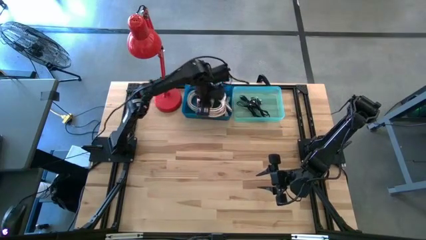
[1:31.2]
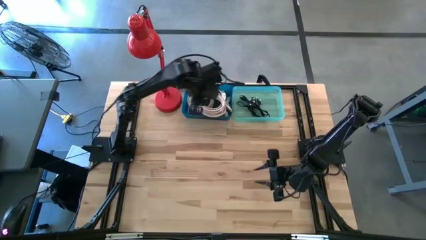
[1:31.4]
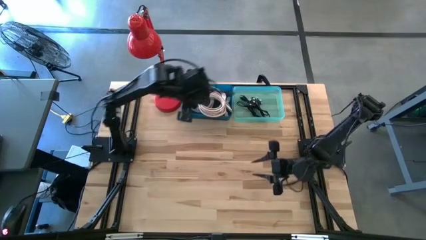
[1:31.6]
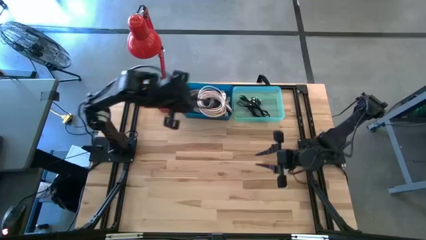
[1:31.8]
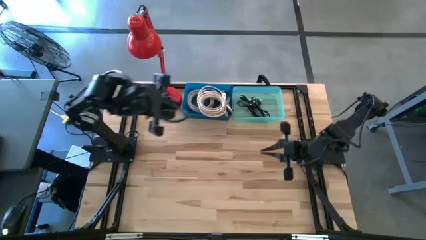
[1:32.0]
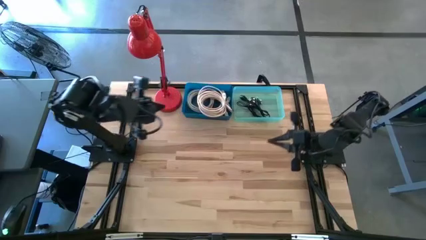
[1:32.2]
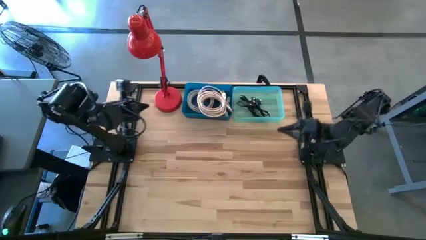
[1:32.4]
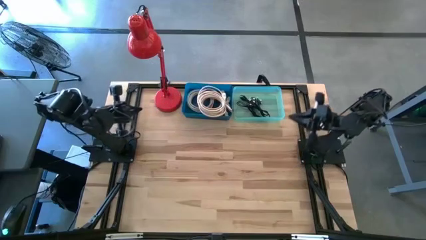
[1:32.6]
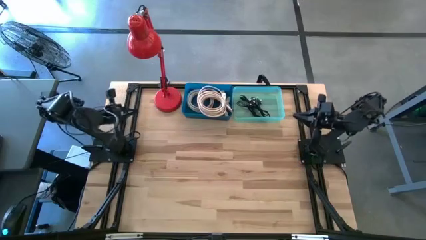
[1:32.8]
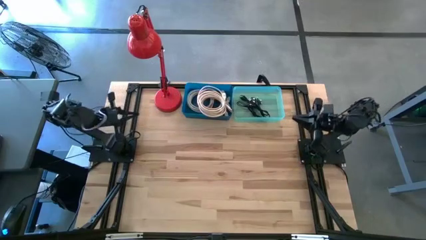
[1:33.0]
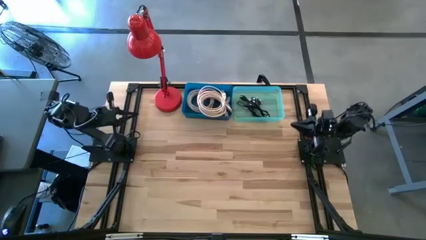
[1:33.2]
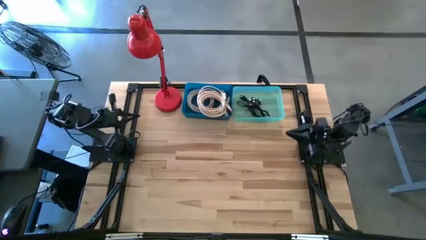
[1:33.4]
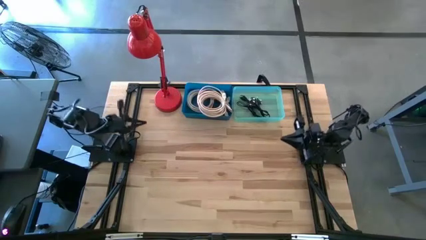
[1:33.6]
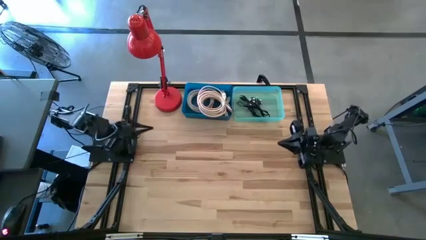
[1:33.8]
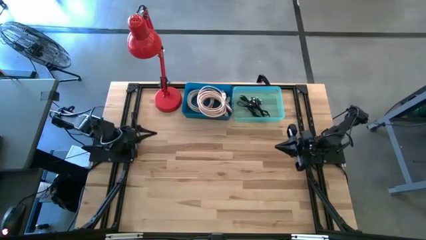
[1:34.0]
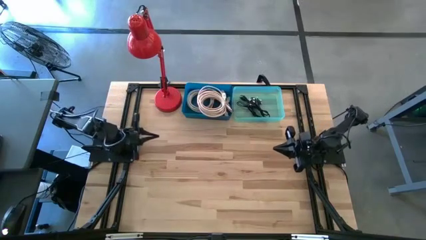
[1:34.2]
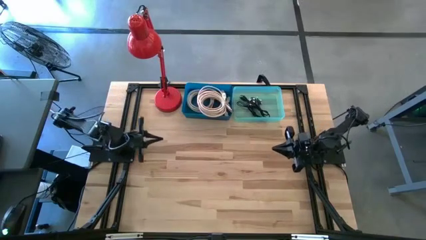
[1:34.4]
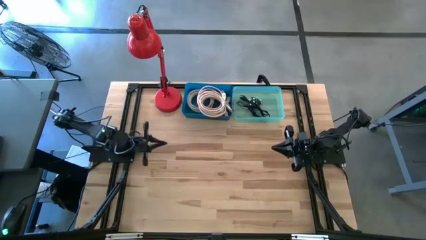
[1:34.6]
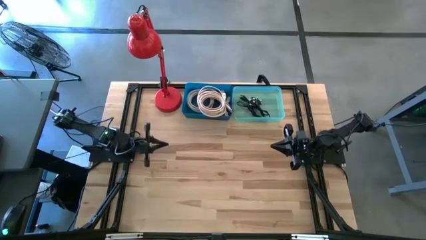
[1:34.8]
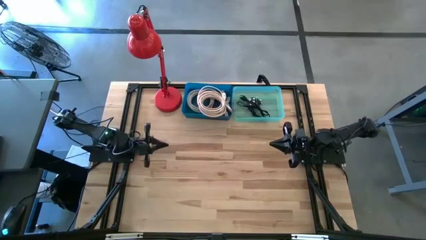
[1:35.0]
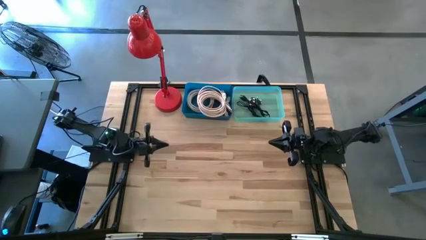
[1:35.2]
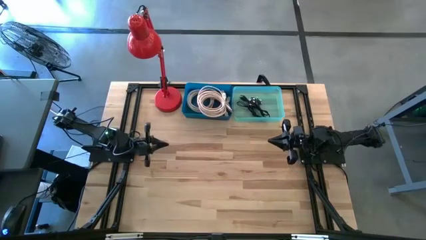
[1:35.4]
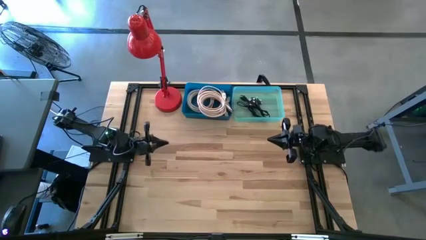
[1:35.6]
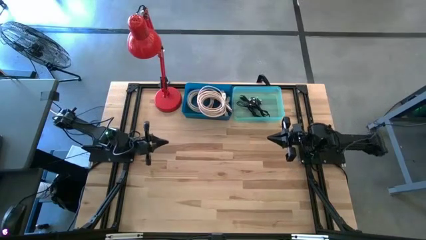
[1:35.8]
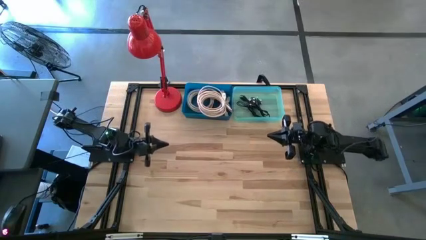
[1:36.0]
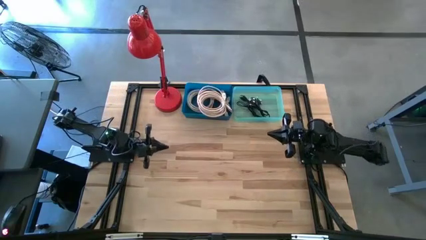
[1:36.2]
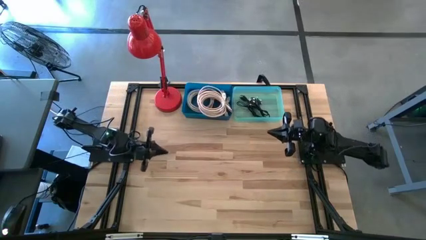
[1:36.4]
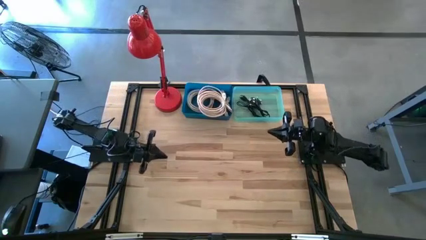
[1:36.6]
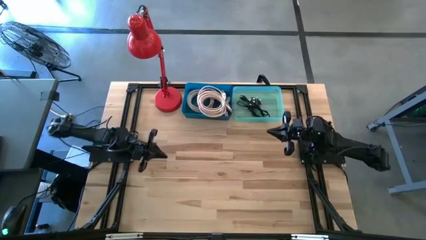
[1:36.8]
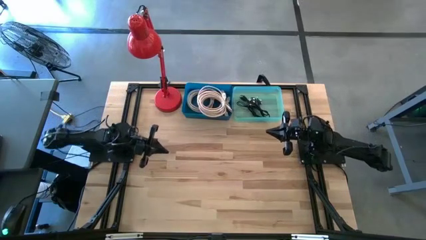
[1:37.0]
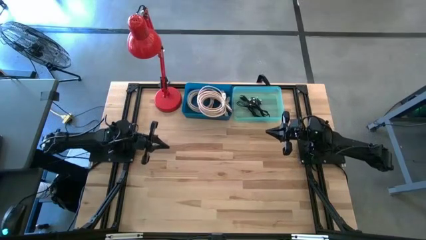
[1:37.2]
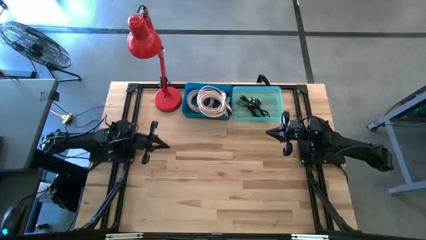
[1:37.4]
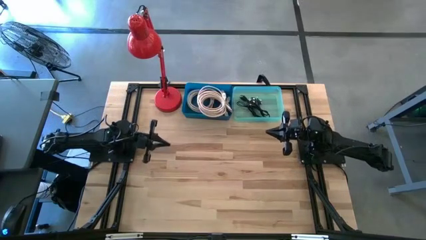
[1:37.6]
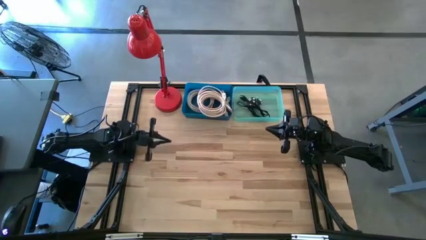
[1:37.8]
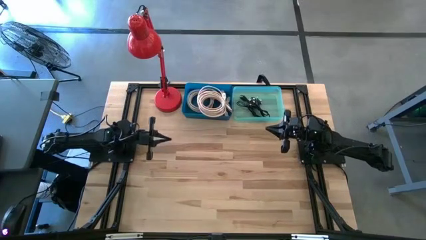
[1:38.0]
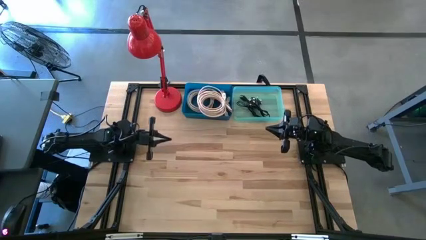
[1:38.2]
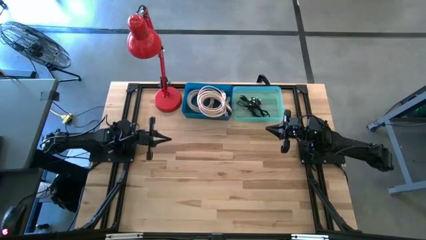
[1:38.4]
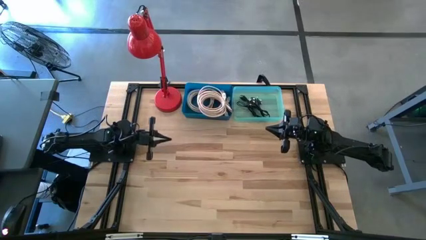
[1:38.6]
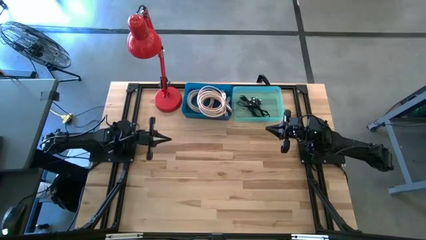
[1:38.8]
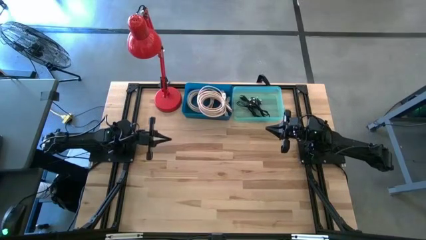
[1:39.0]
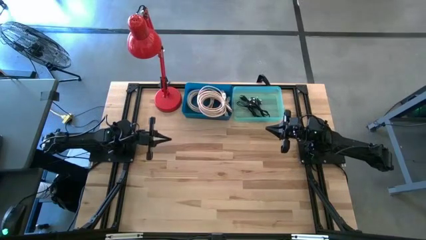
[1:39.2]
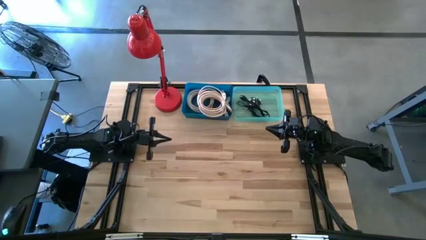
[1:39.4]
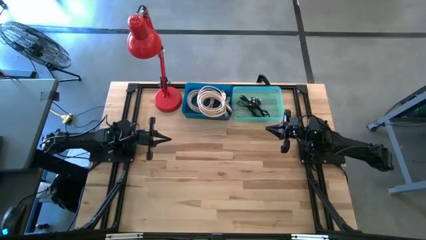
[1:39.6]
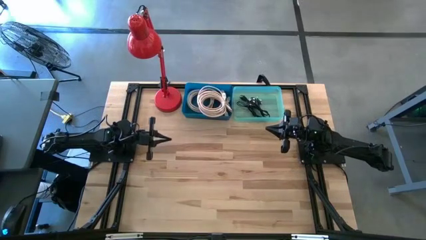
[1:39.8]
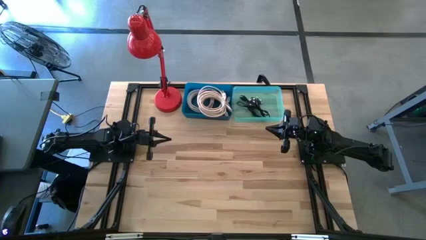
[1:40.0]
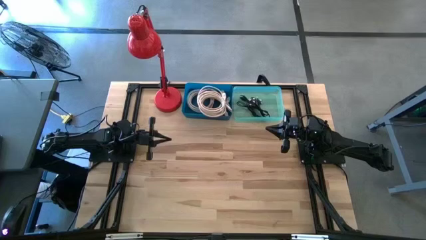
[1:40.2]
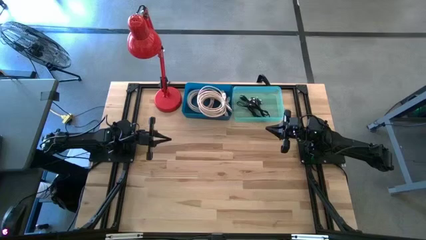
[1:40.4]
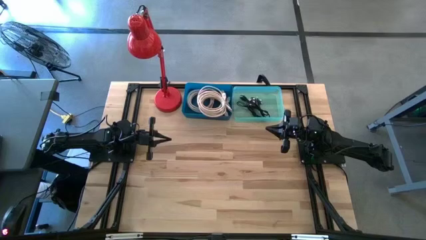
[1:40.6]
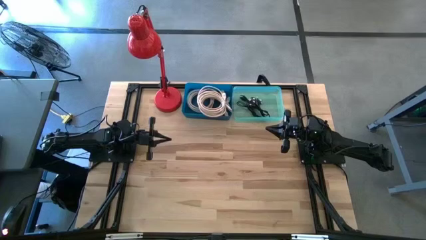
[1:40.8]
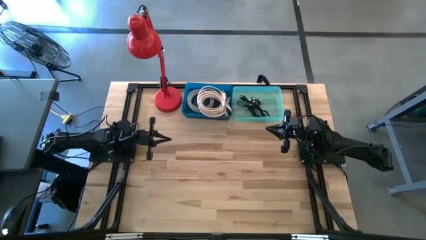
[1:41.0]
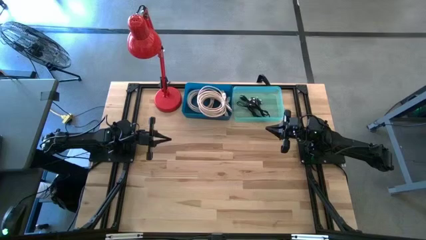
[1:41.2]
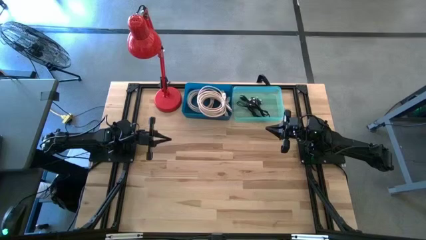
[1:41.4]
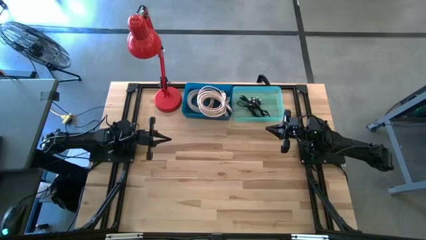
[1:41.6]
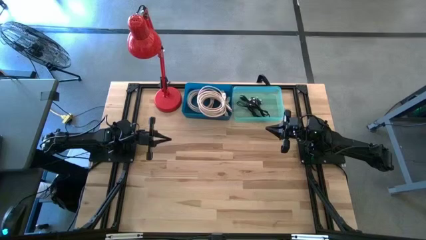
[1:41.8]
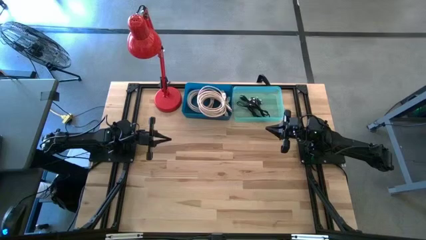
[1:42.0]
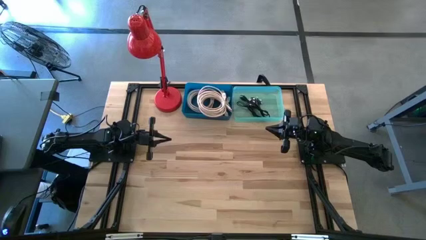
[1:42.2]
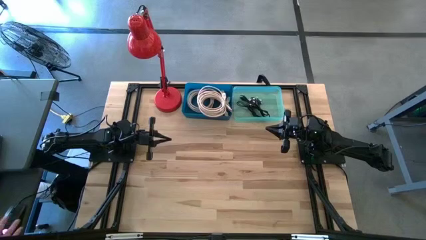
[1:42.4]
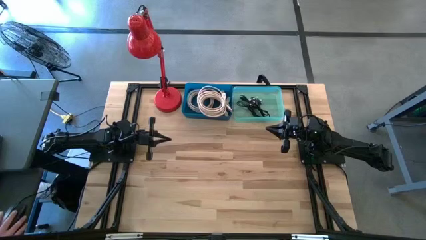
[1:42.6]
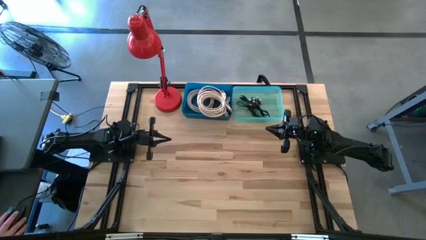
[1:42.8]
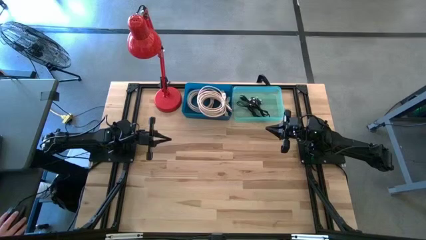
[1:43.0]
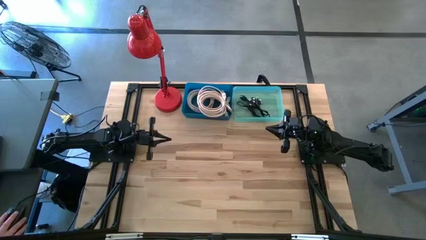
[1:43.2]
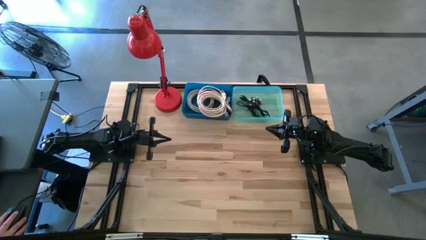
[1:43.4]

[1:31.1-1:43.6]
Task: Pick & Place USB Port
Return to Home Position
